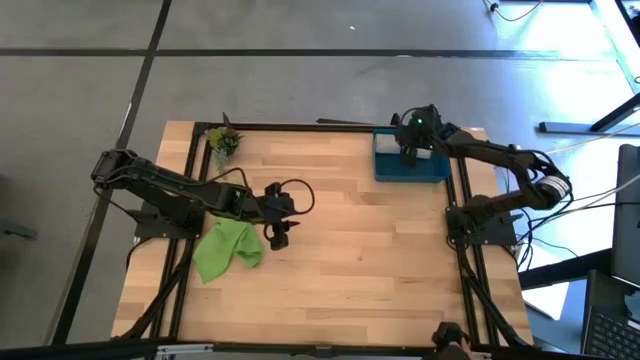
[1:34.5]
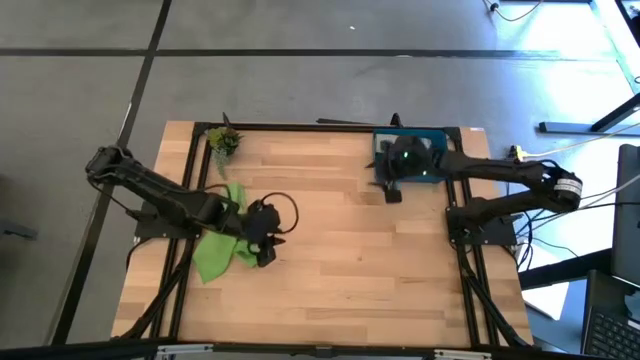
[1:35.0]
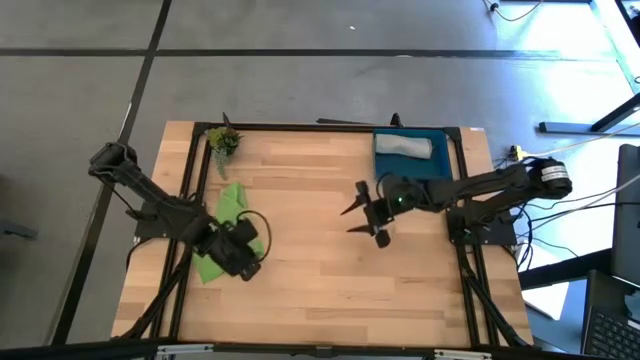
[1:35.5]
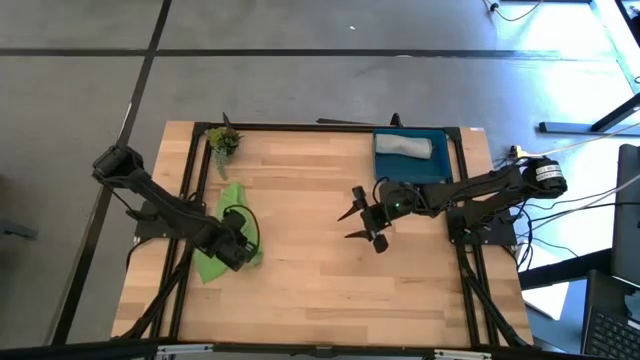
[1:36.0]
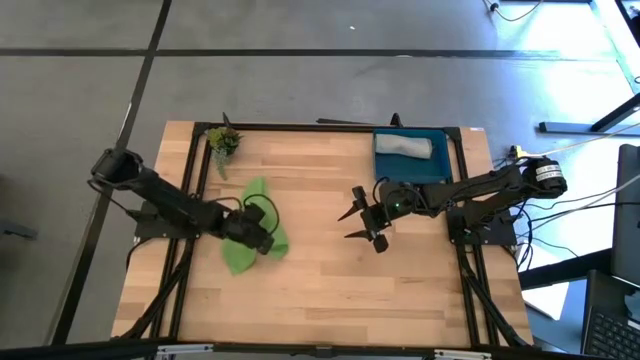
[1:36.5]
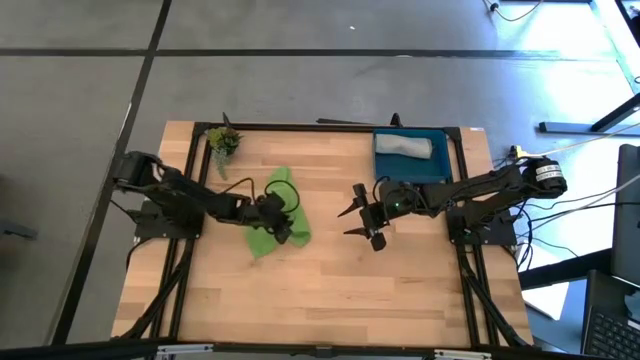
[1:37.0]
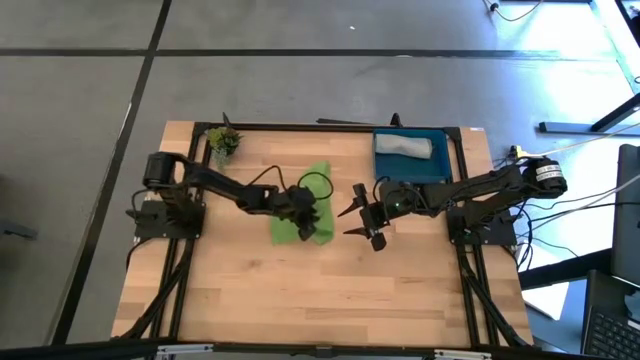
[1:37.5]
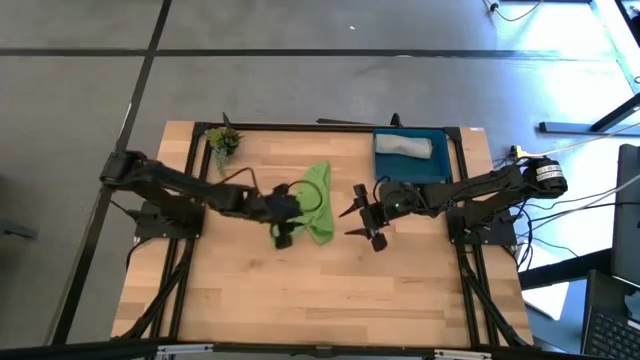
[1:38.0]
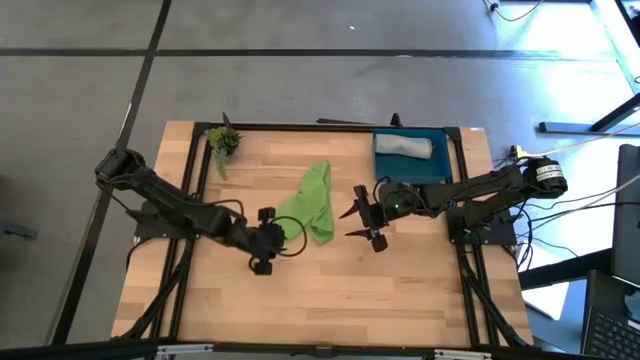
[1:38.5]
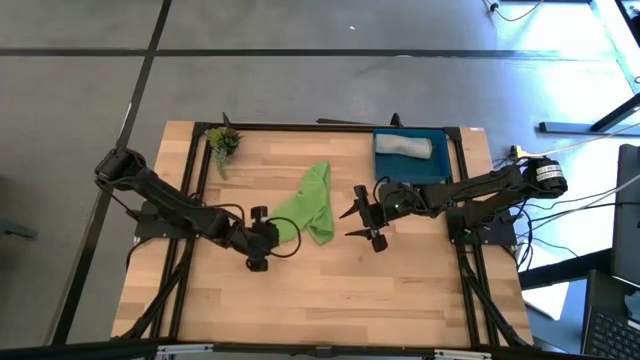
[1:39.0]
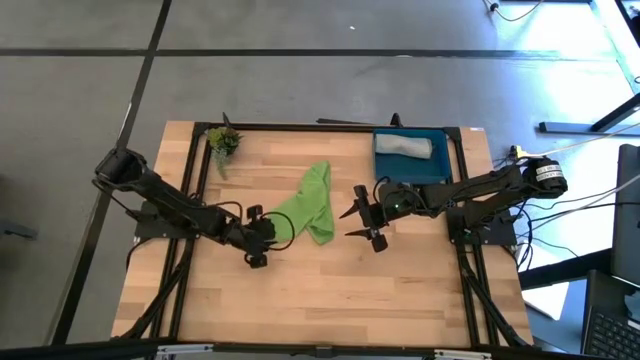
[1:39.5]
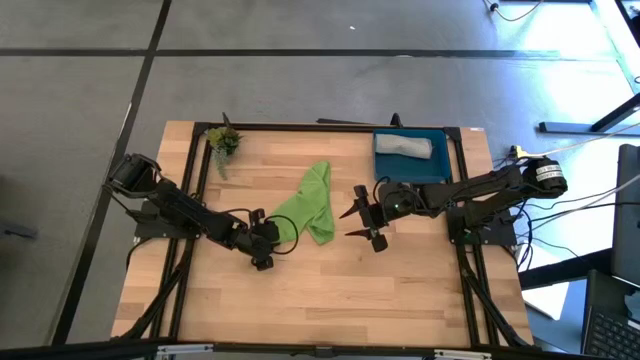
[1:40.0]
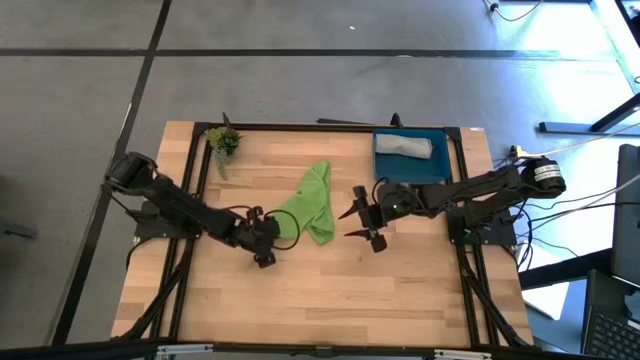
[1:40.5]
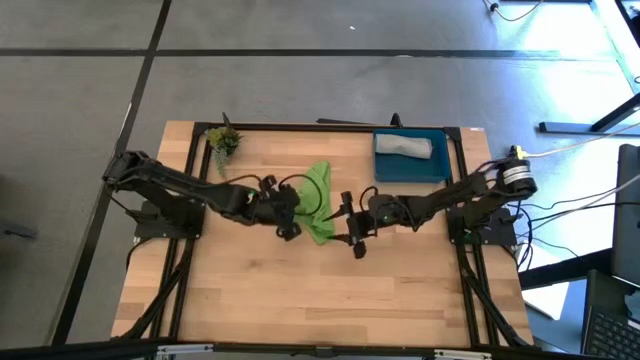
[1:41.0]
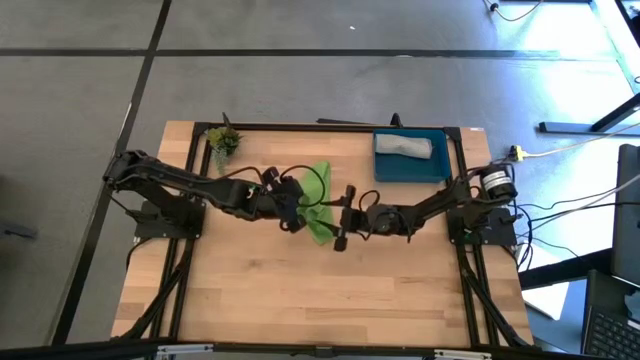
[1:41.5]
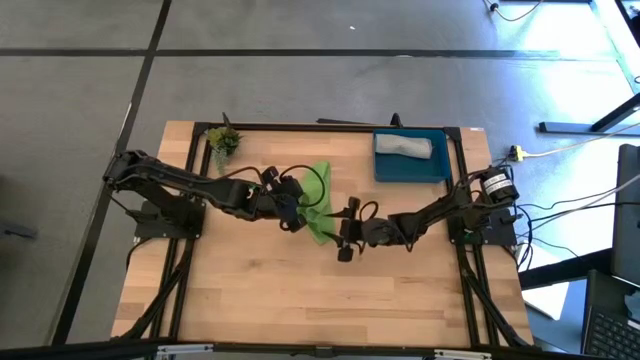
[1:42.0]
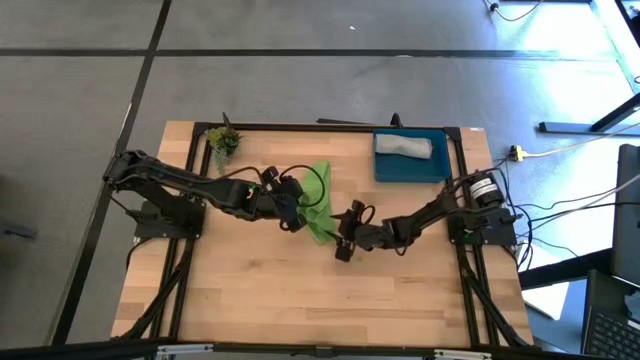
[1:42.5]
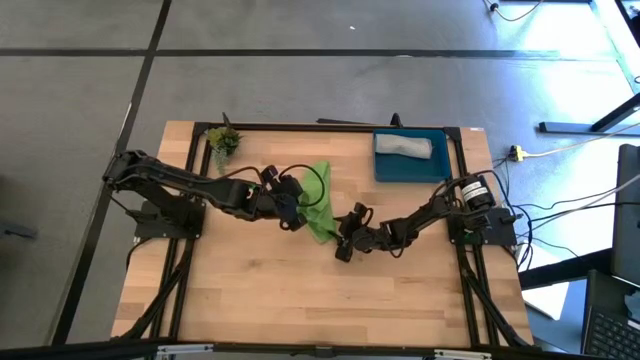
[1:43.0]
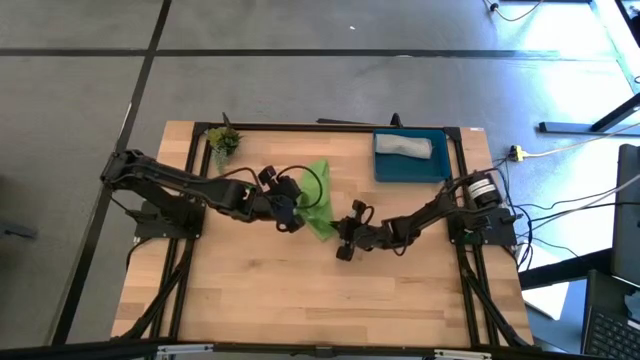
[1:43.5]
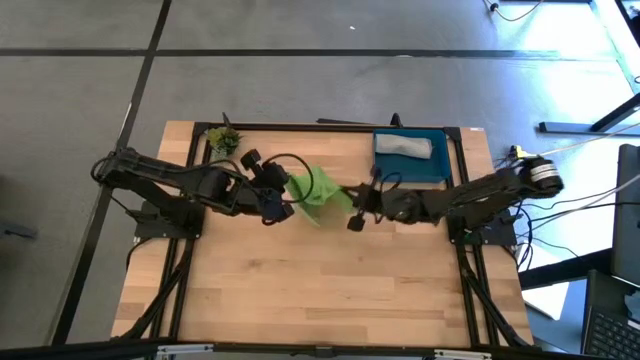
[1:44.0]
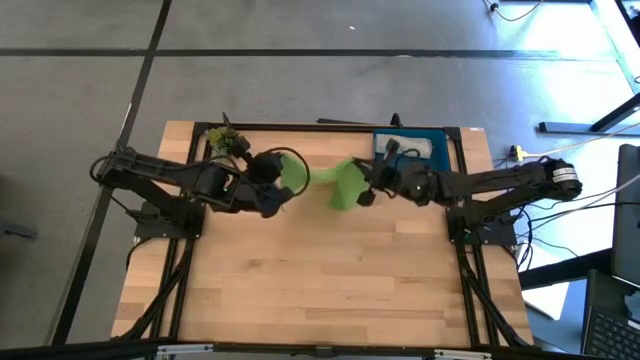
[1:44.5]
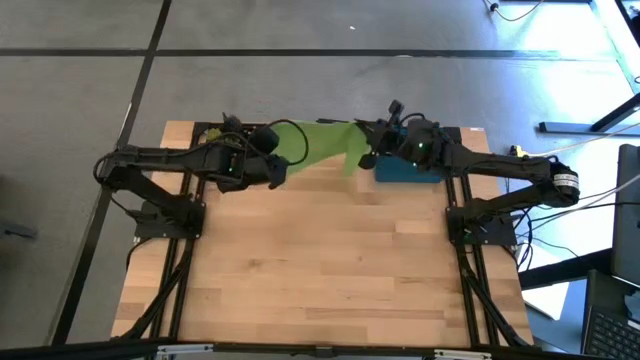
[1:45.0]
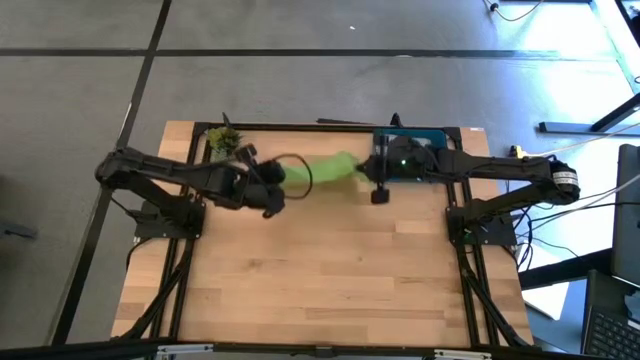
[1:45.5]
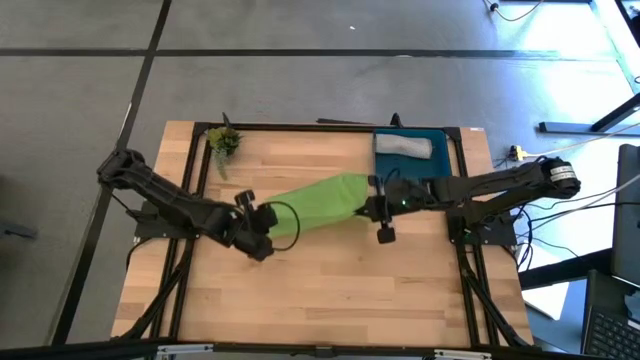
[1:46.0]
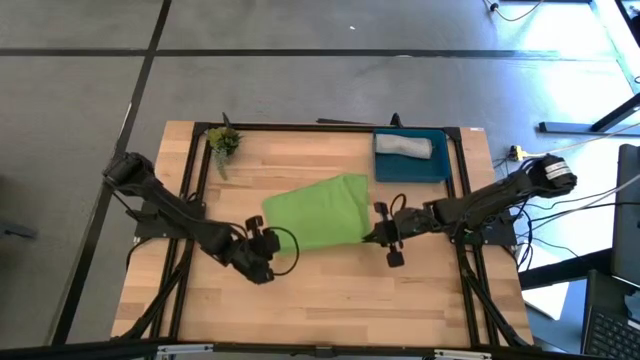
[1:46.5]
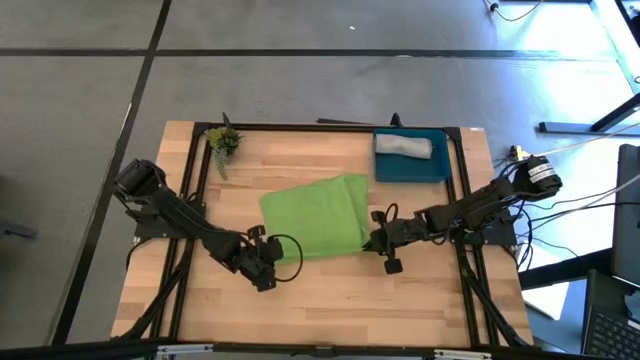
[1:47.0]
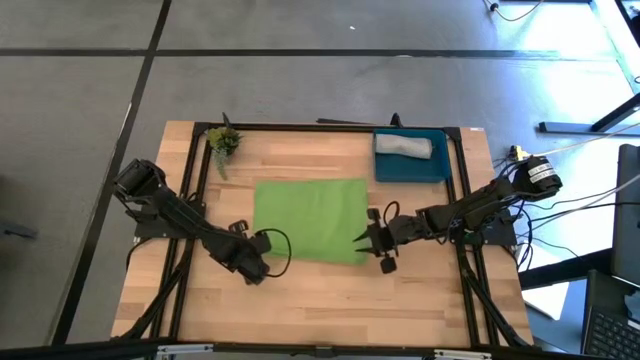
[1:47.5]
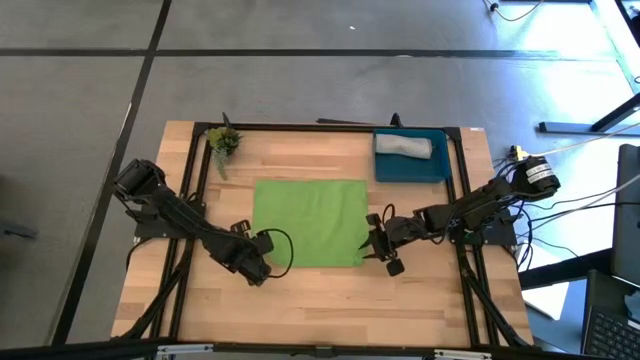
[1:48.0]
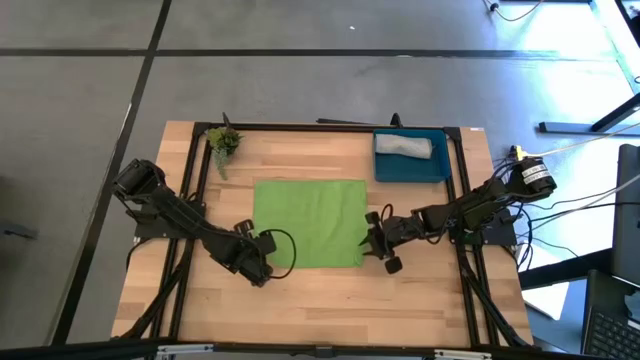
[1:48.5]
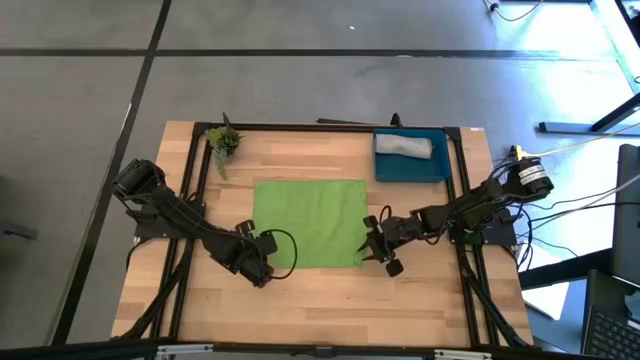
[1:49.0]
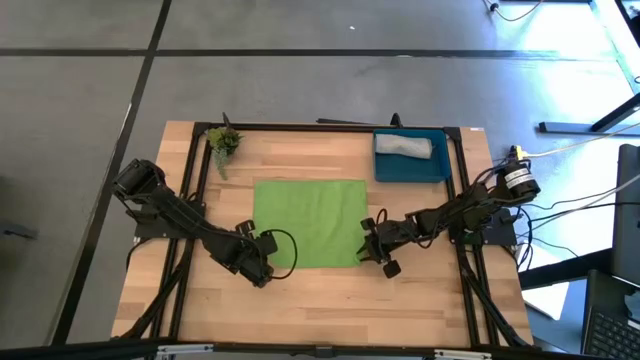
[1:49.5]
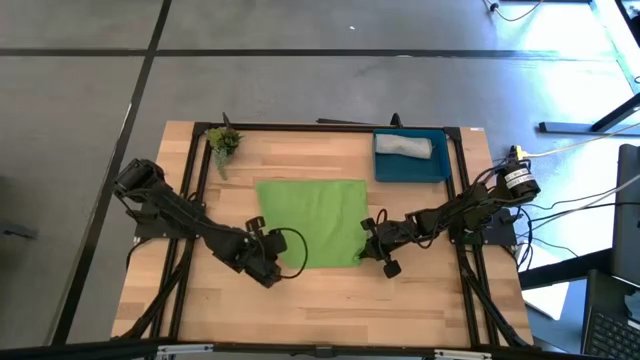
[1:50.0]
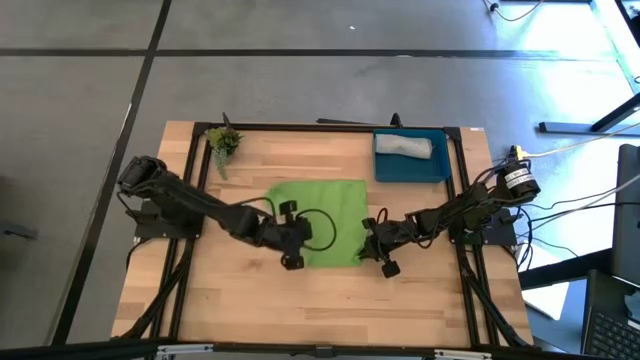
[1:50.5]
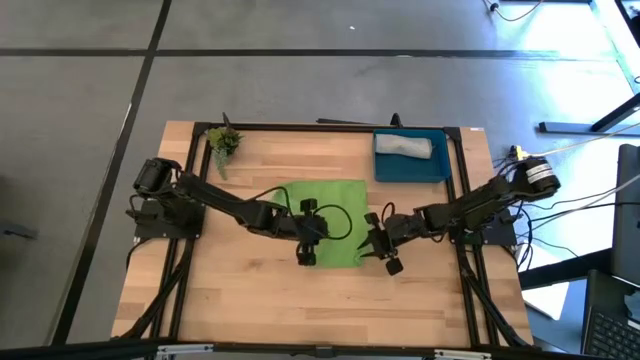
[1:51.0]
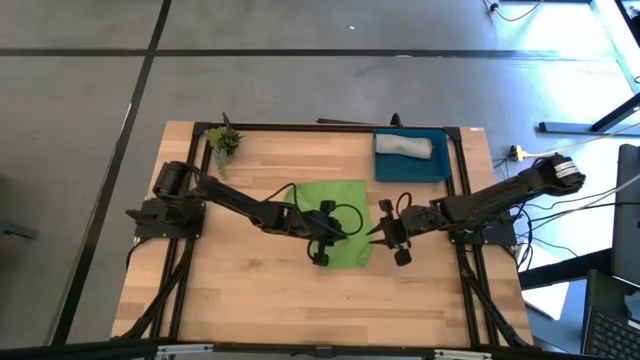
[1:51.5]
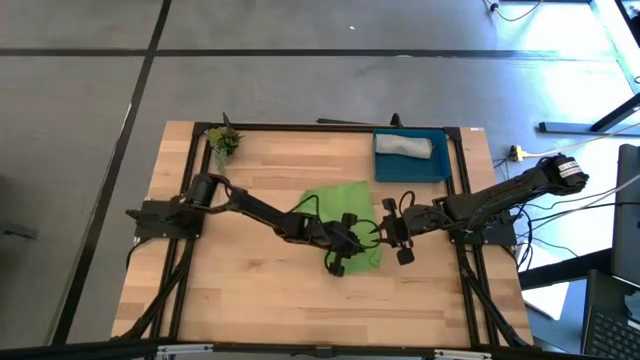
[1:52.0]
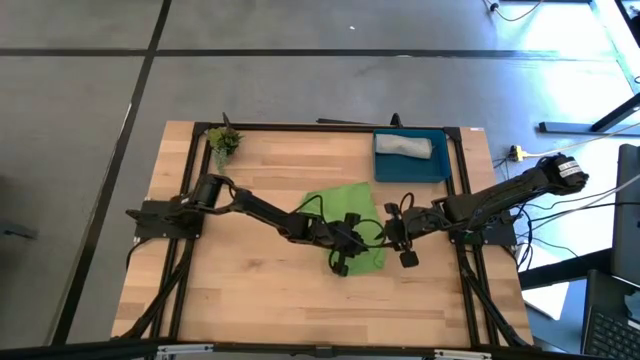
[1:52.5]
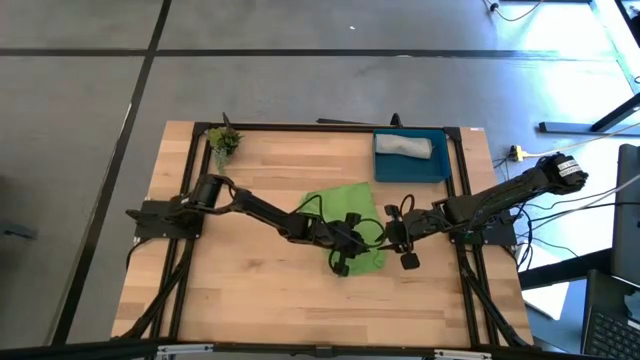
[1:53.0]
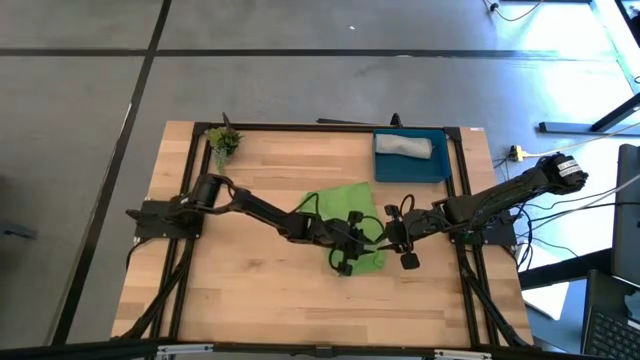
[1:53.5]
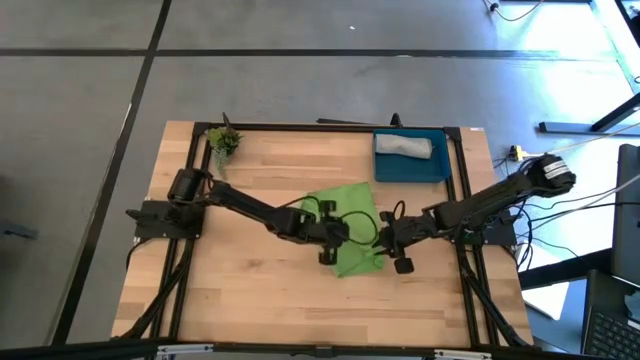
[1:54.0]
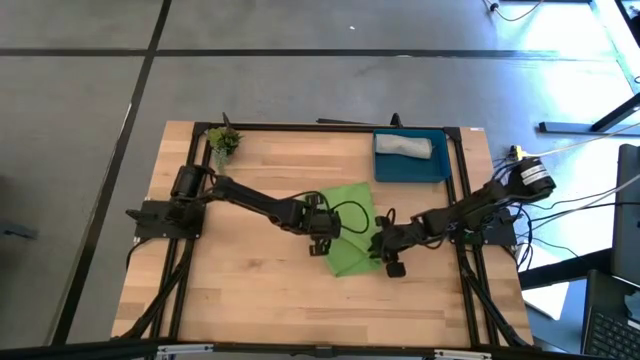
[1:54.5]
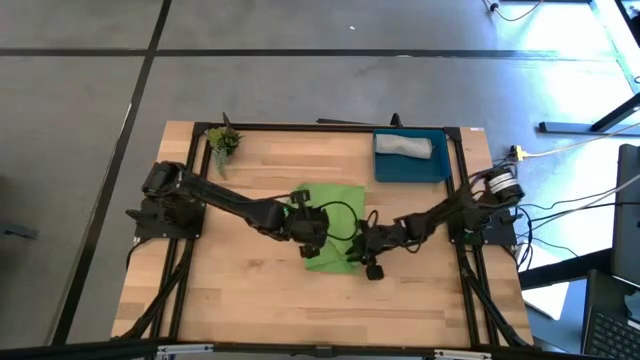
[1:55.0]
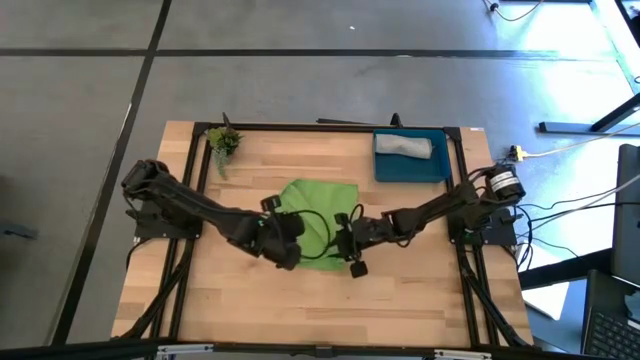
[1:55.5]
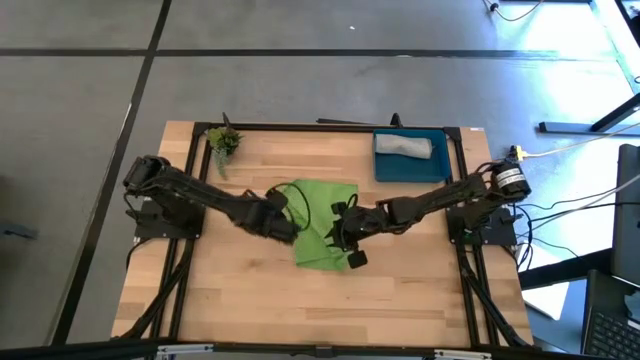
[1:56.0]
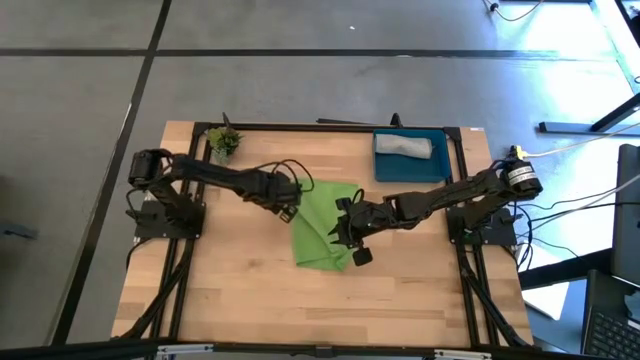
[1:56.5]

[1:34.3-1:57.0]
Task: Roll microfiber towels into tight, uniform cylinder then place into a basket
Fold the green microfiber cloth
